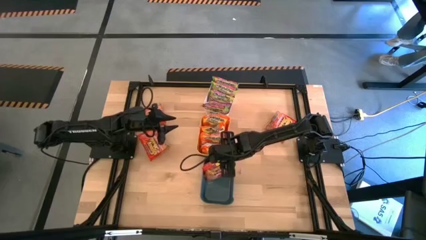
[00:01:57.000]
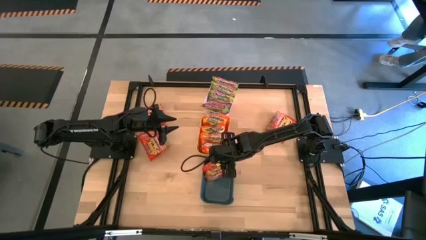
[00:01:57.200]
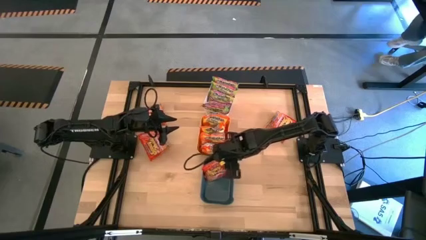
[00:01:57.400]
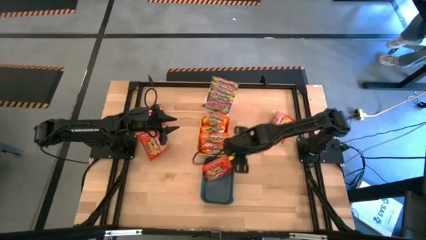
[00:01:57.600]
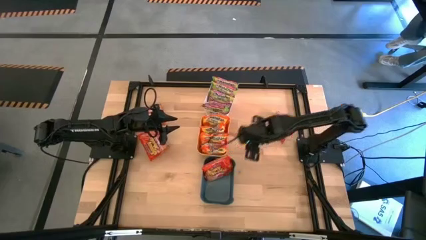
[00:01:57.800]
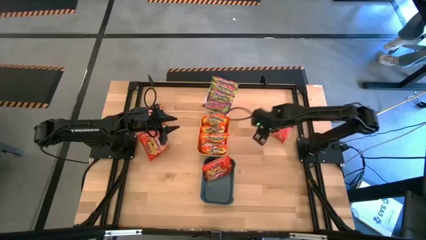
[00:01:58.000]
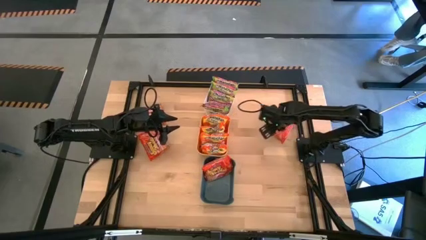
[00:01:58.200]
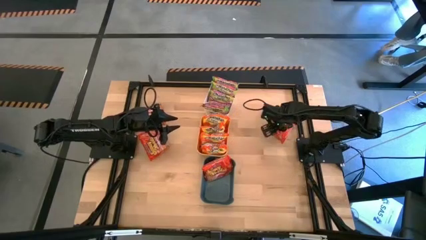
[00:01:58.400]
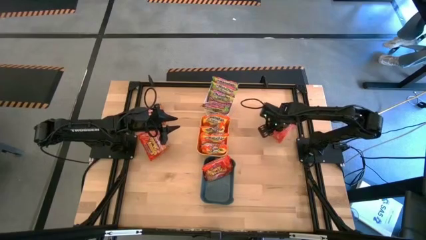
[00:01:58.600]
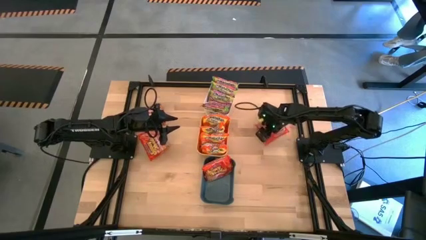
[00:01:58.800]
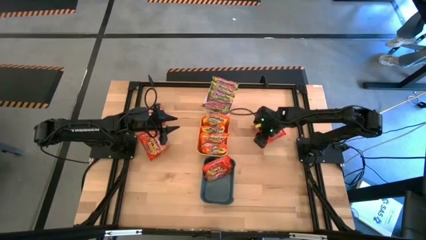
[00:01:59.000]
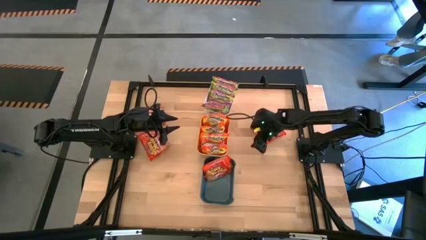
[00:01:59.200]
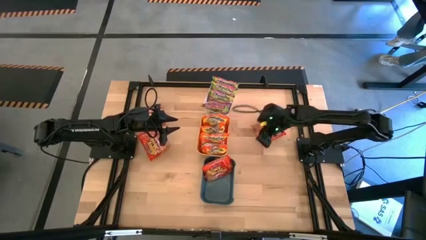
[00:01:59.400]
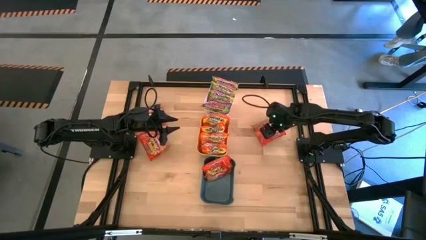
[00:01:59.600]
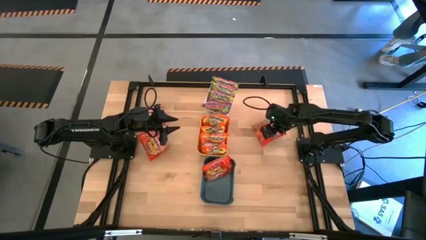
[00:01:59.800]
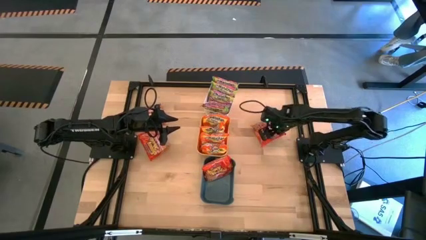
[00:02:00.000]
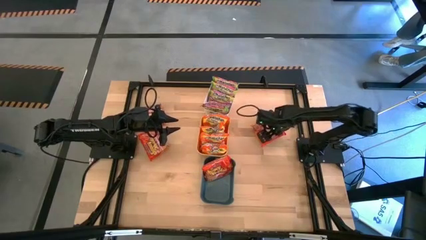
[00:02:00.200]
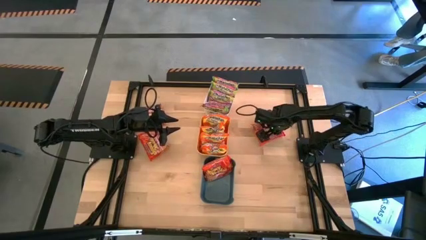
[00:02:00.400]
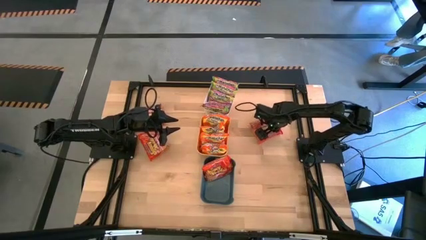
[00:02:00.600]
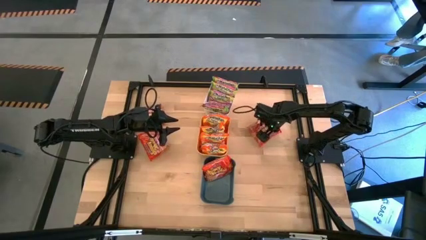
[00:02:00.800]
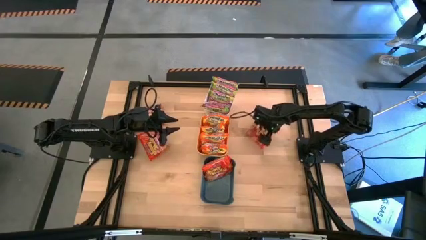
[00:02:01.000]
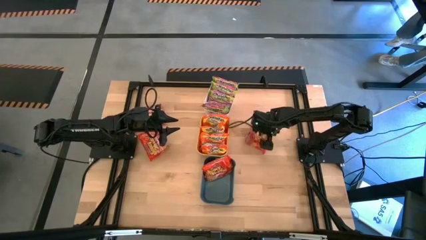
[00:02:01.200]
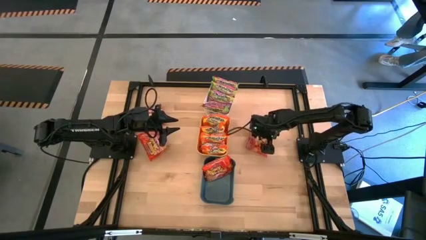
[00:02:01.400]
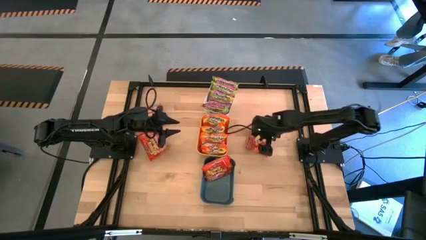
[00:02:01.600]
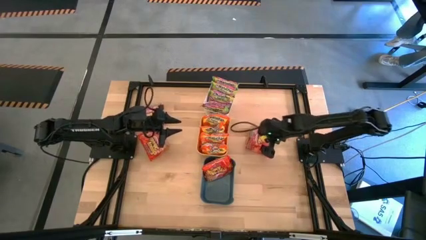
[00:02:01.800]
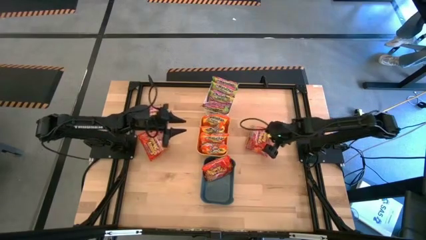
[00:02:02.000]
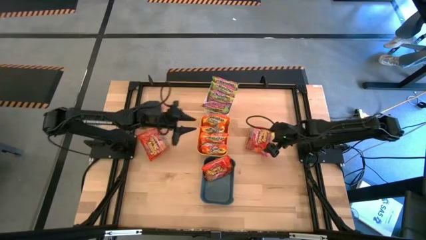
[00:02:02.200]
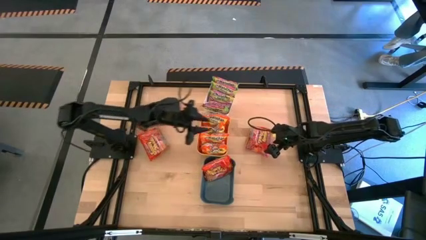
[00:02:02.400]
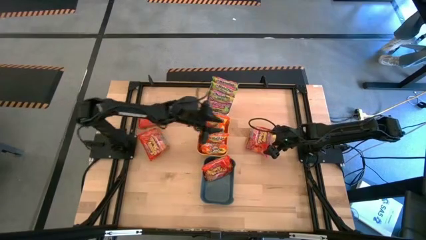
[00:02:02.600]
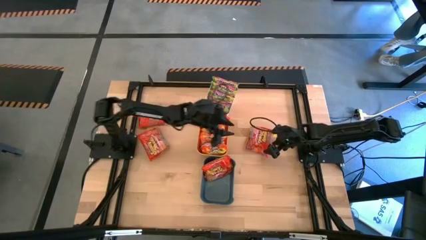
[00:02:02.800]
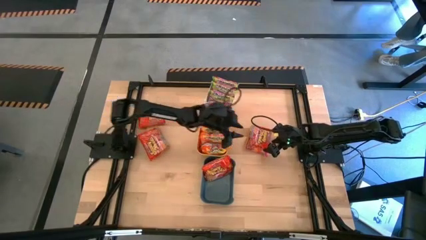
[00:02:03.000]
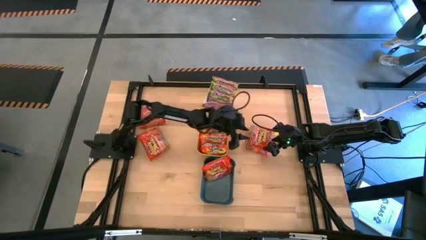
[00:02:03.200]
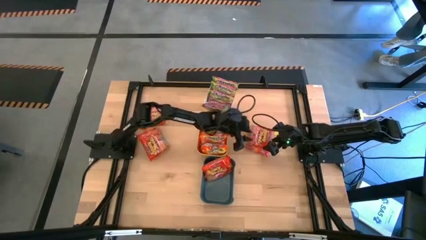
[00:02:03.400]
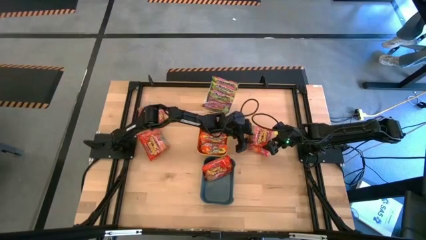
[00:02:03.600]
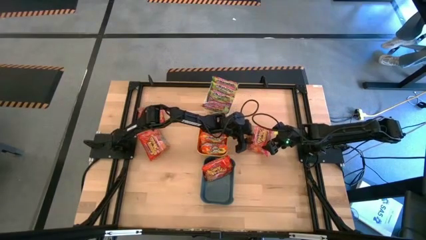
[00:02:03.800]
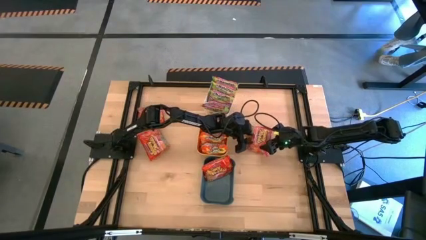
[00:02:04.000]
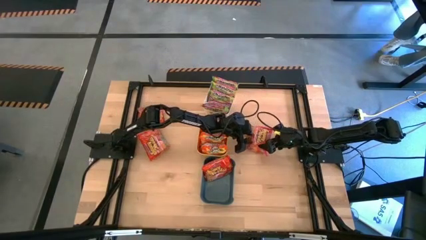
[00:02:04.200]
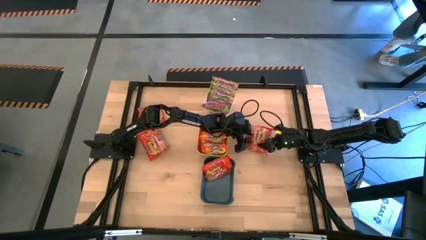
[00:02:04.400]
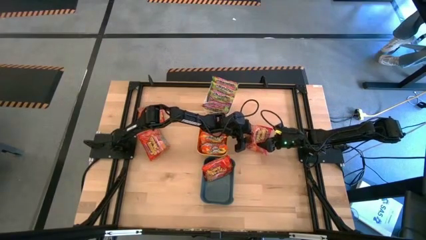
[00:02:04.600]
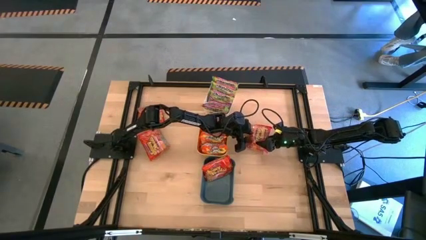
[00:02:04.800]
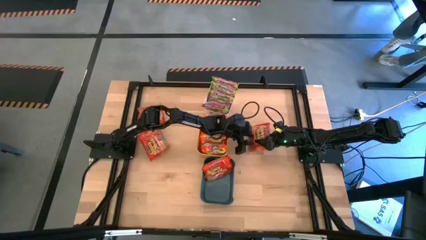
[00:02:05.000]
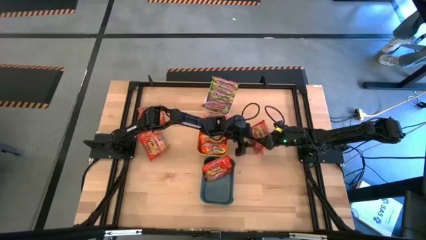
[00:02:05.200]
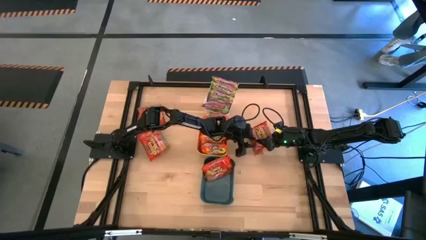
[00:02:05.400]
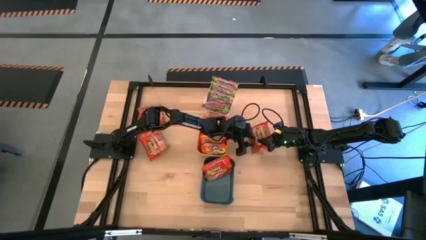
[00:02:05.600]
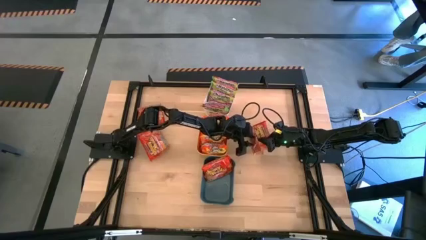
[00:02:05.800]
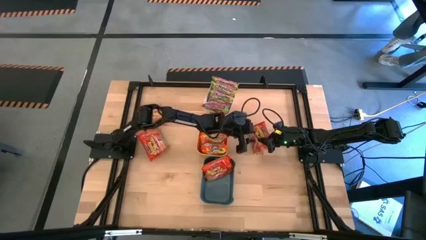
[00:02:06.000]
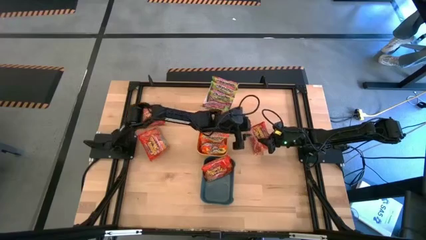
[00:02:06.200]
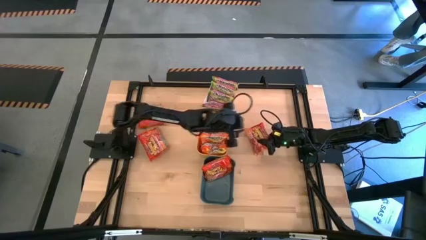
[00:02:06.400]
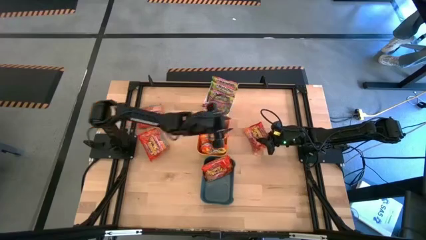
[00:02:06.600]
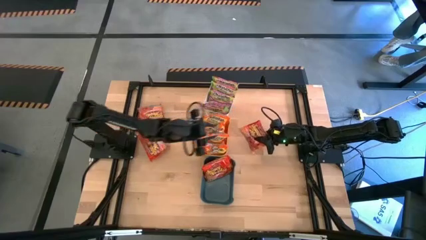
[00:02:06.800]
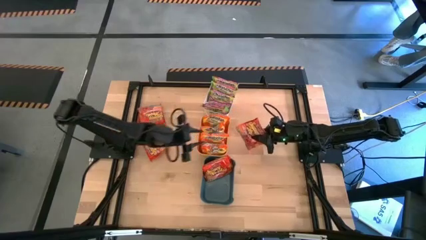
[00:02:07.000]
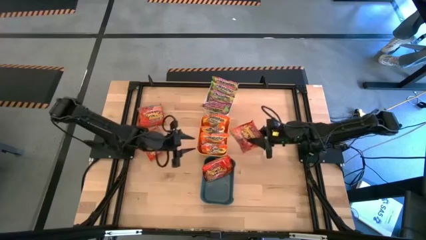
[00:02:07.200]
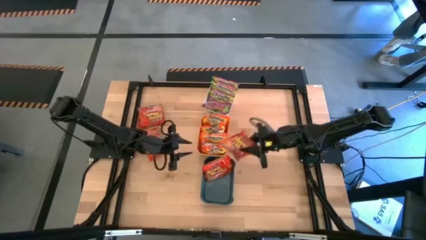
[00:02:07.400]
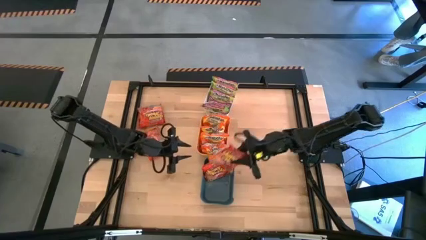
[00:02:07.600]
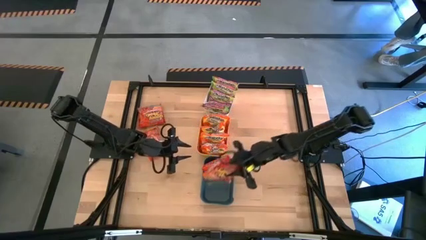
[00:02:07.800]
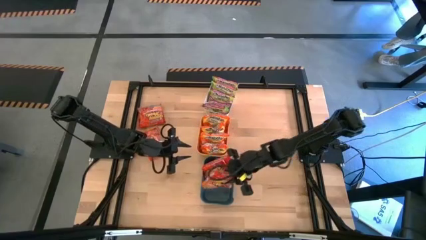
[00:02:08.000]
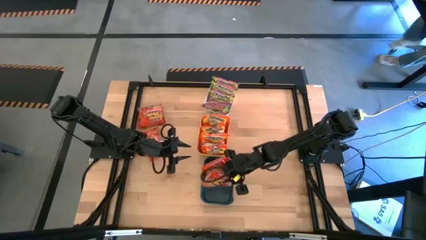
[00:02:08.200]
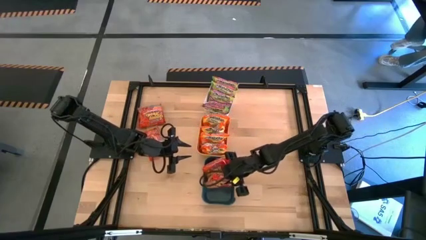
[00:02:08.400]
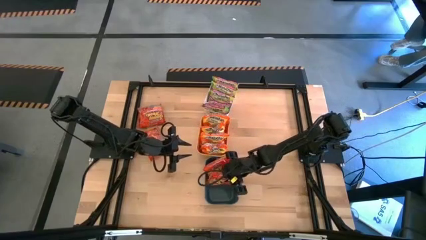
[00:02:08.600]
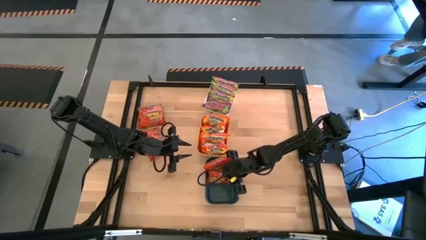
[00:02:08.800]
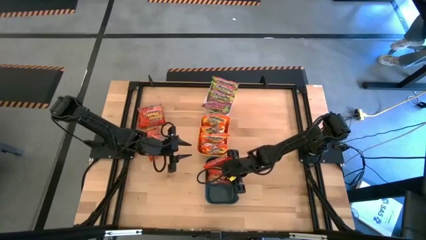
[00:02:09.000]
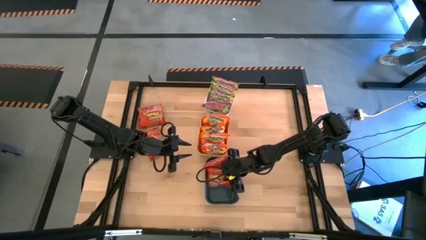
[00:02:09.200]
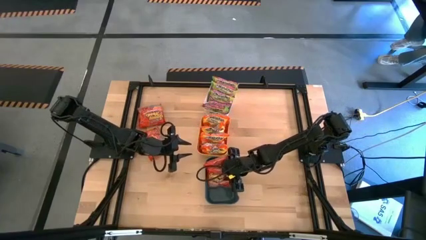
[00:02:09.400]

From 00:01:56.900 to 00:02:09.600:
Task: Sort Maruchan noodles
Put the orange noodle pack into the blue bin

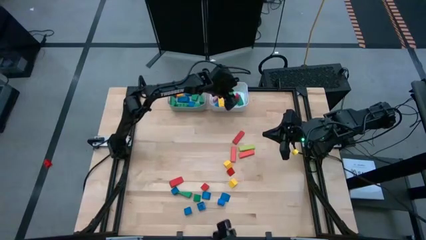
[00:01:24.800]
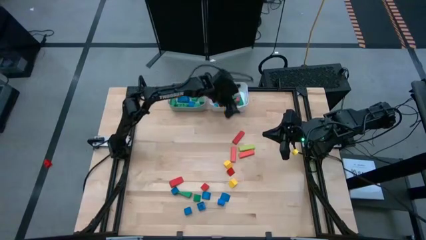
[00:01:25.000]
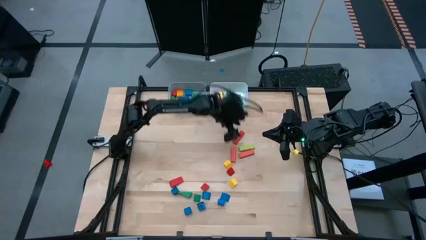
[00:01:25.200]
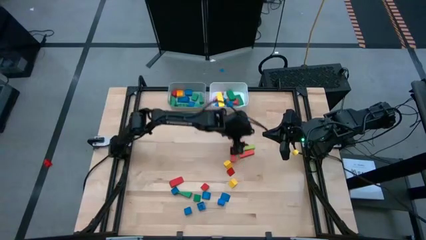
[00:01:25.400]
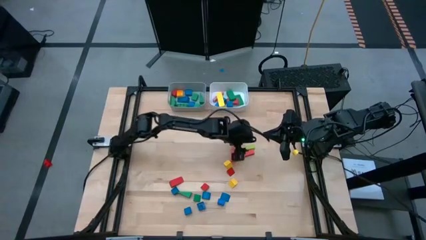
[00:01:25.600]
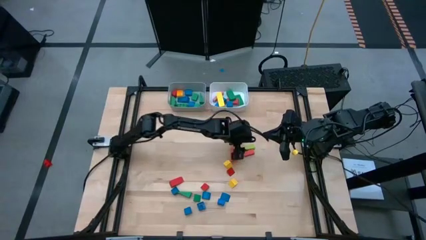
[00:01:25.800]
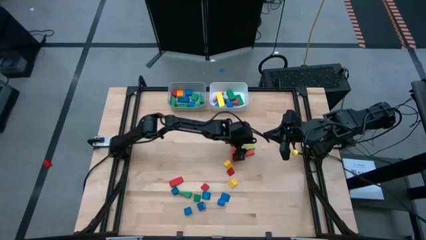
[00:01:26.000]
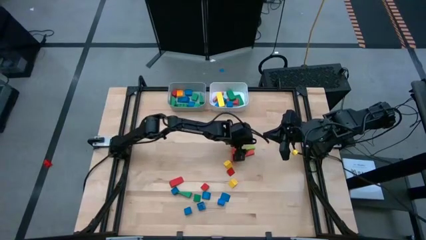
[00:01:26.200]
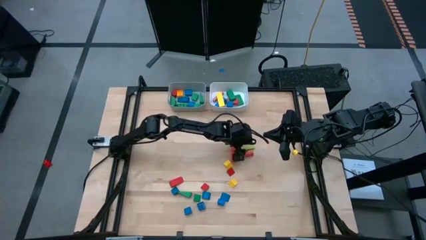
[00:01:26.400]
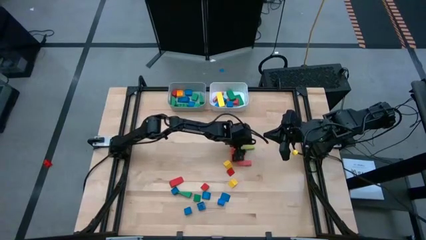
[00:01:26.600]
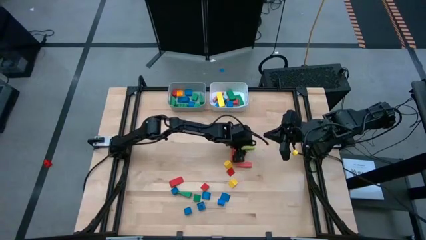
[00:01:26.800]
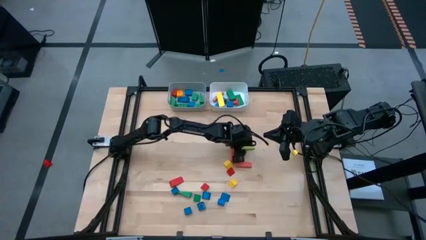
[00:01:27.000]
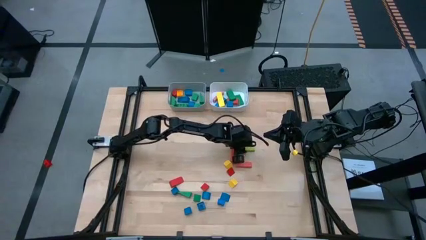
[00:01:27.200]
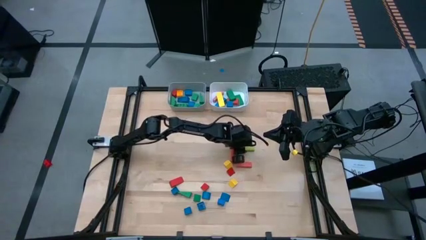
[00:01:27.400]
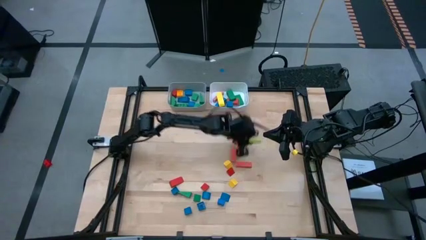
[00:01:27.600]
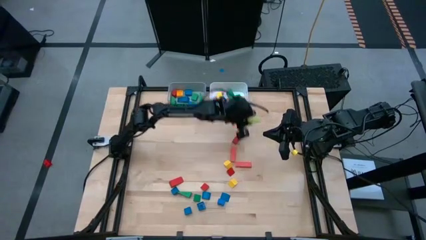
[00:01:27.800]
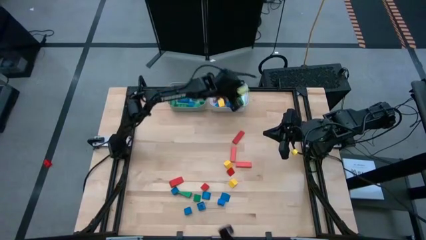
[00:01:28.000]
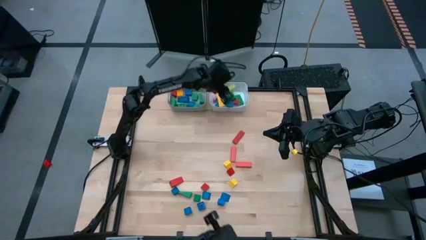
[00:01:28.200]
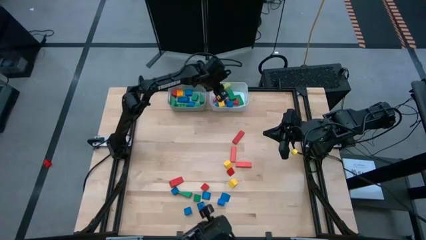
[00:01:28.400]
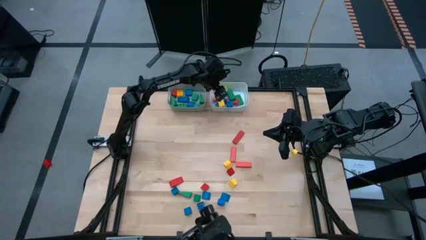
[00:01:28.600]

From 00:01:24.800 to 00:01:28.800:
Task: Sort blocks by size
Put the light green rectangular block into the white bin
